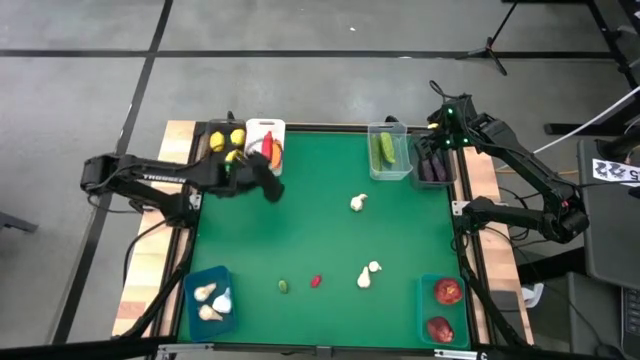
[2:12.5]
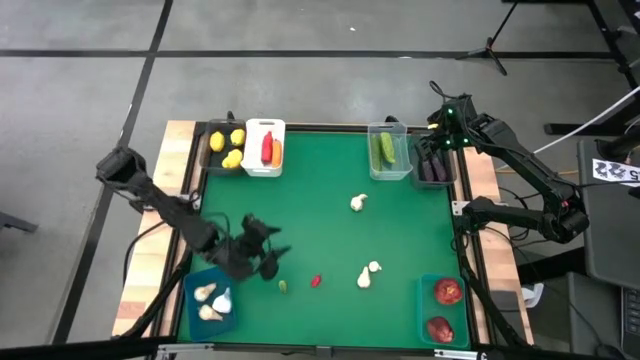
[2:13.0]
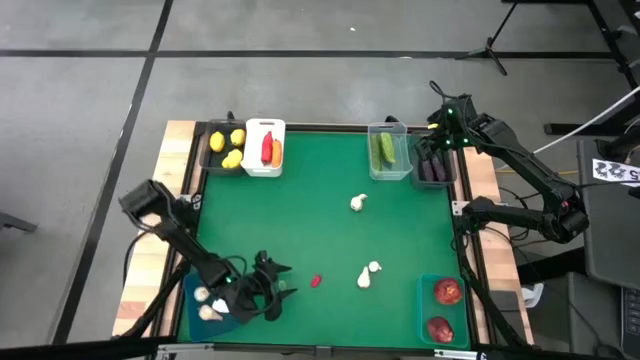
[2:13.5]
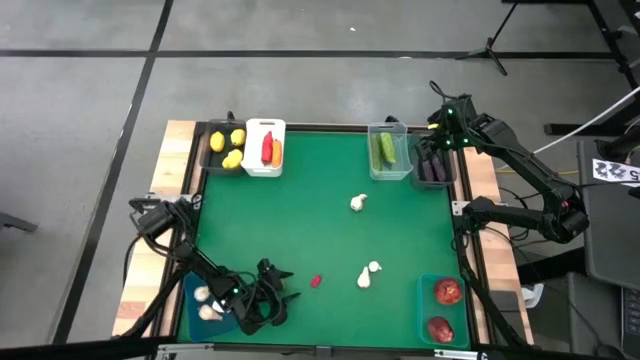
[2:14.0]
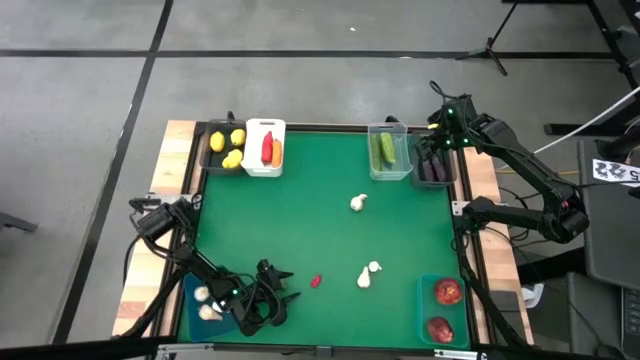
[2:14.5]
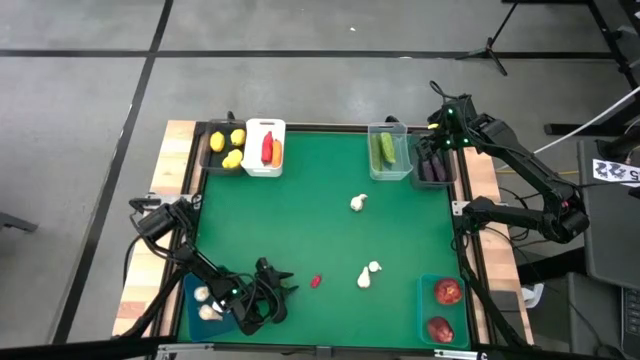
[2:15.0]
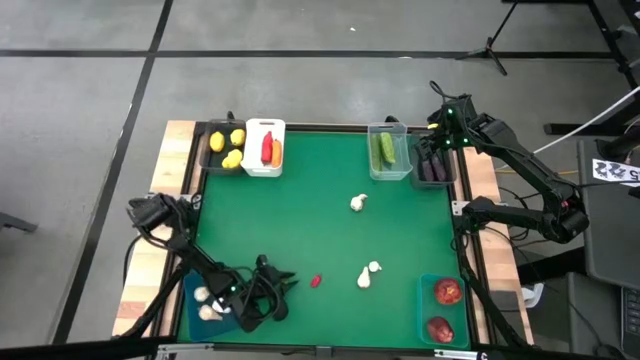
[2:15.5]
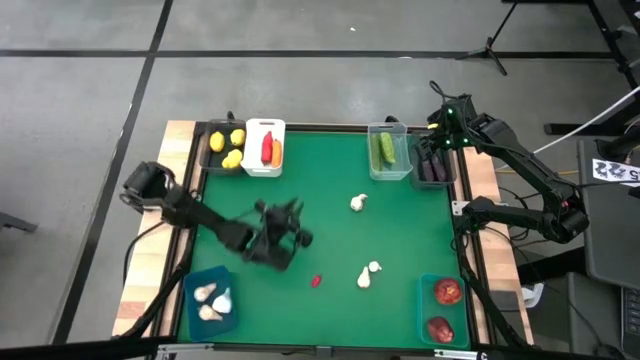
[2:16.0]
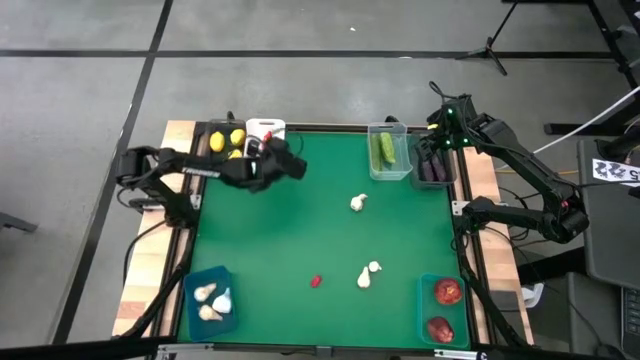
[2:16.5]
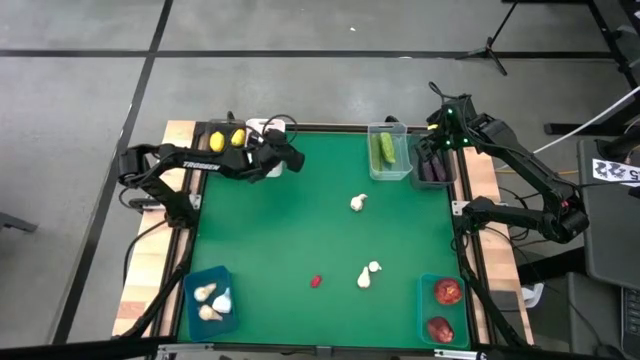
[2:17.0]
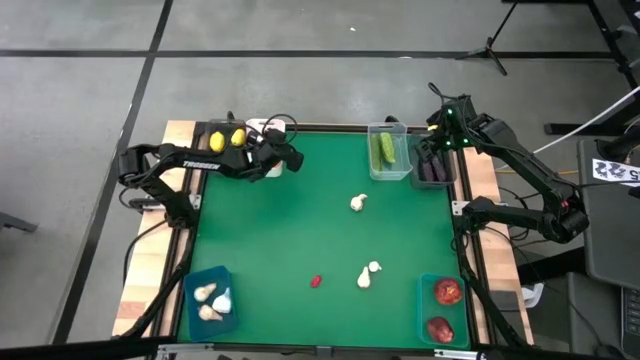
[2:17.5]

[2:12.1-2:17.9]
Task: Sort produce into baskets
Put the green chili pepper into the white bin

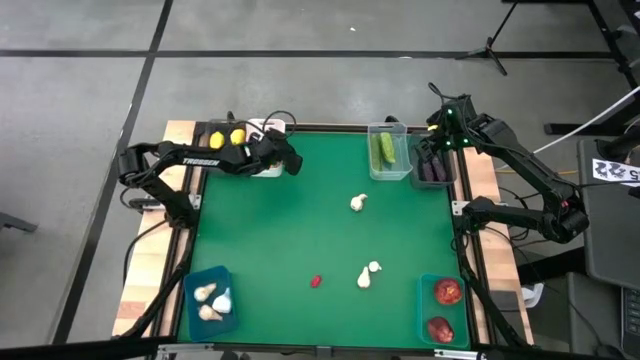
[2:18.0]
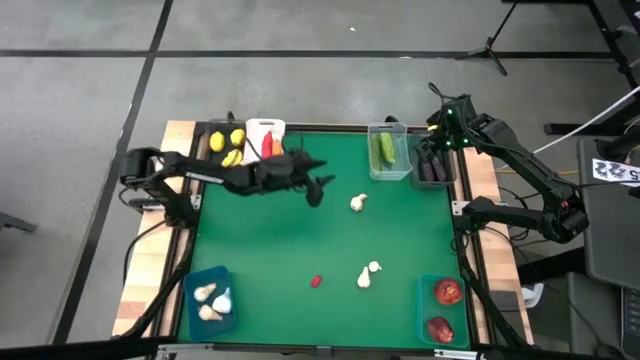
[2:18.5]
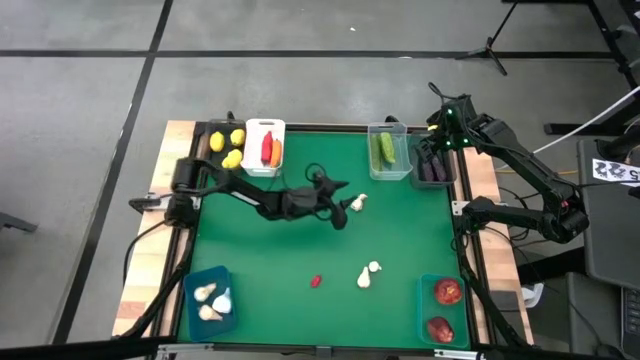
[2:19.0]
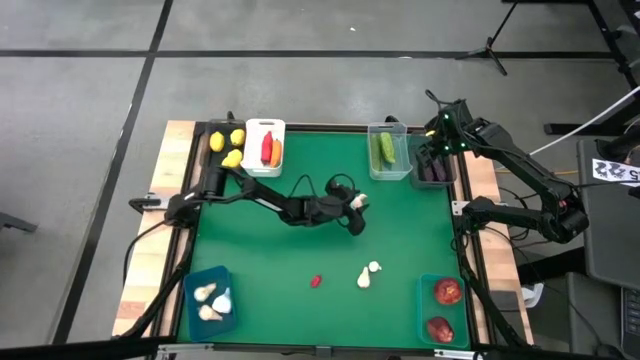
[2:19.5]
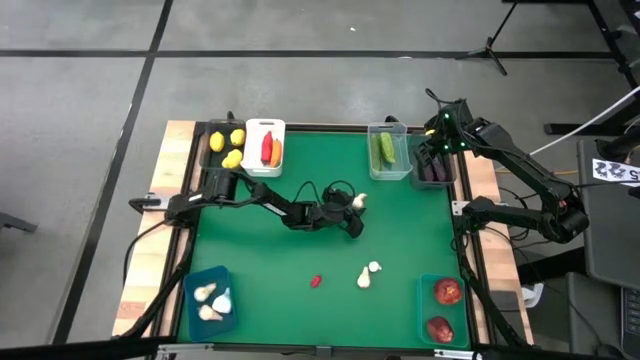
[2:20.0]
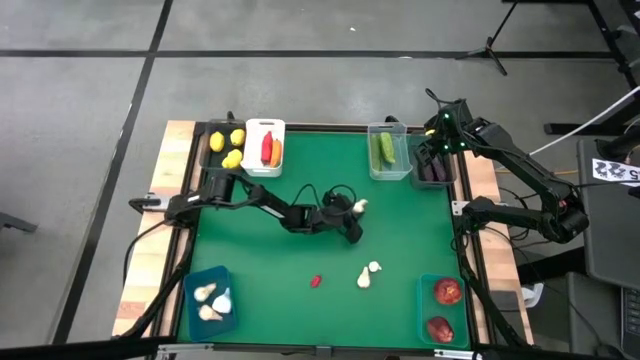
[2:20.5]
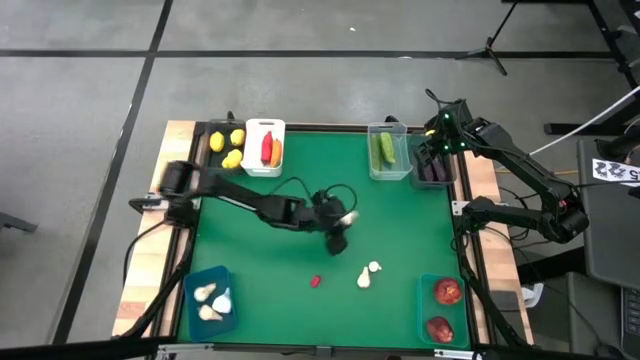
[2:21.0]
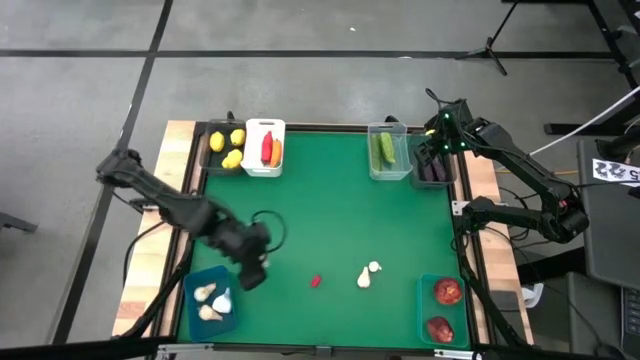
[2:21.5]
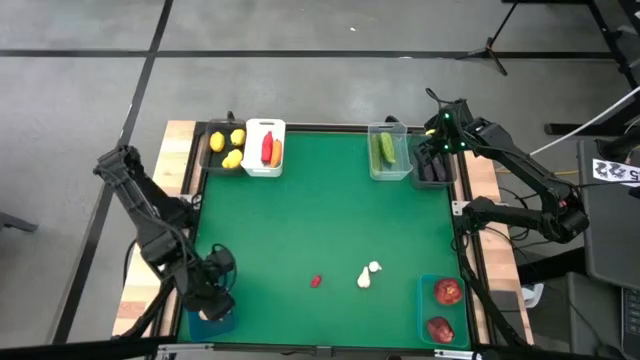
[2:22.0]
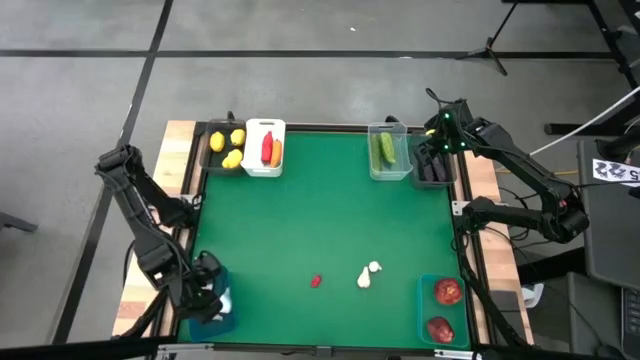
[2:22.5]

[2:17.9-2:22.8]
Put the garlic into the blue bin

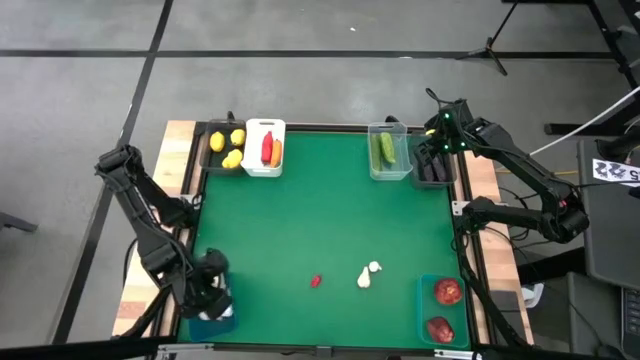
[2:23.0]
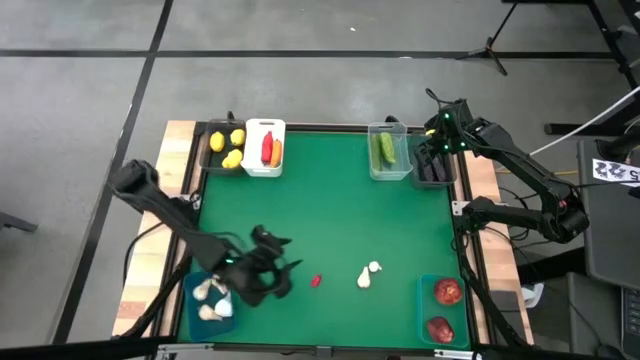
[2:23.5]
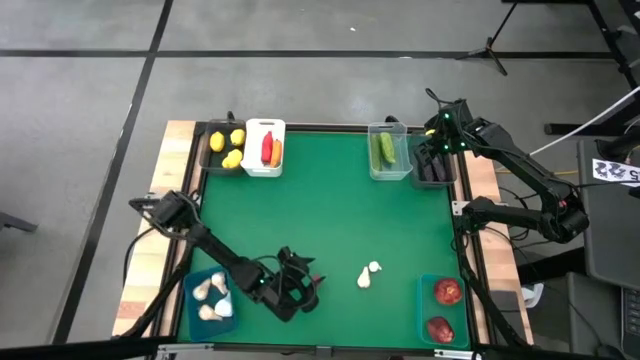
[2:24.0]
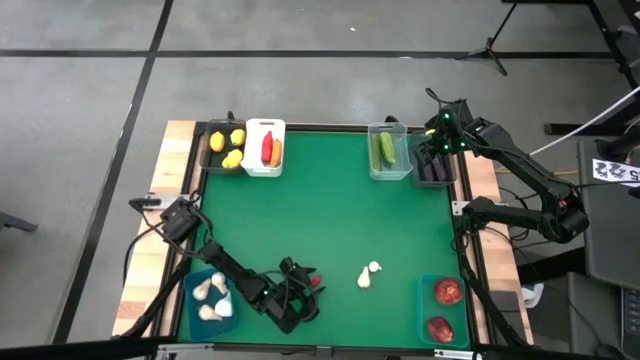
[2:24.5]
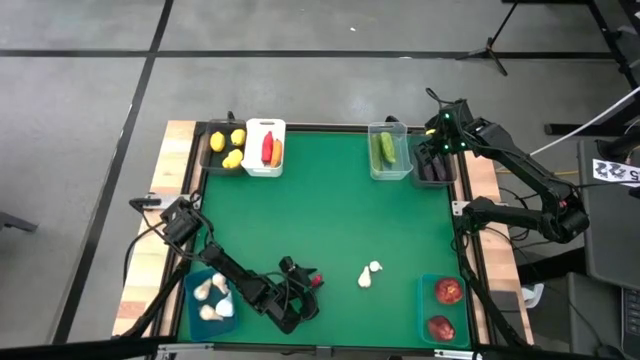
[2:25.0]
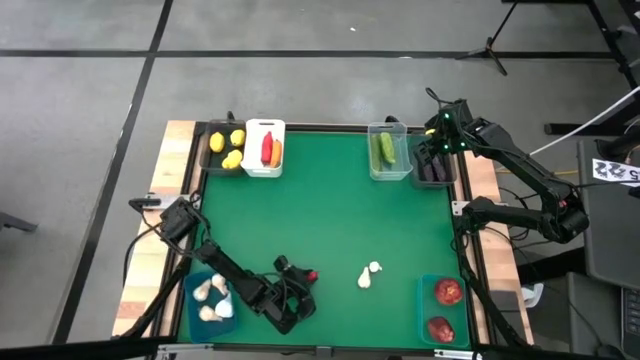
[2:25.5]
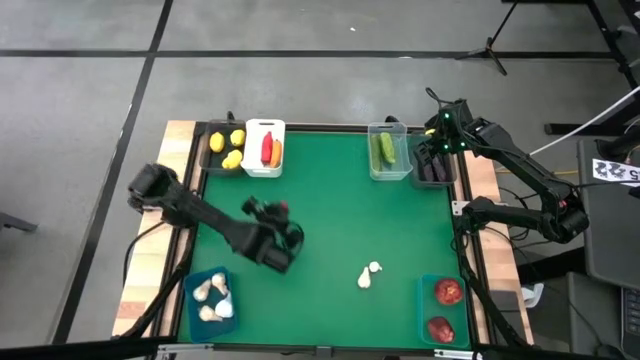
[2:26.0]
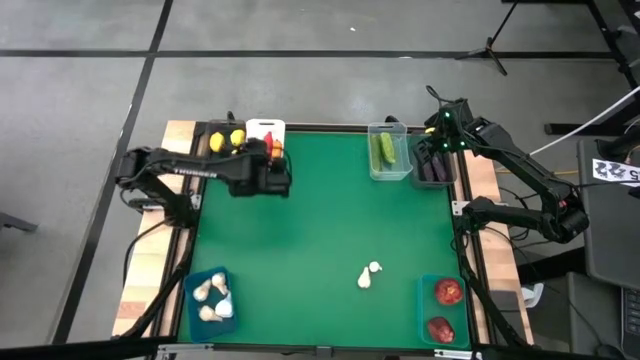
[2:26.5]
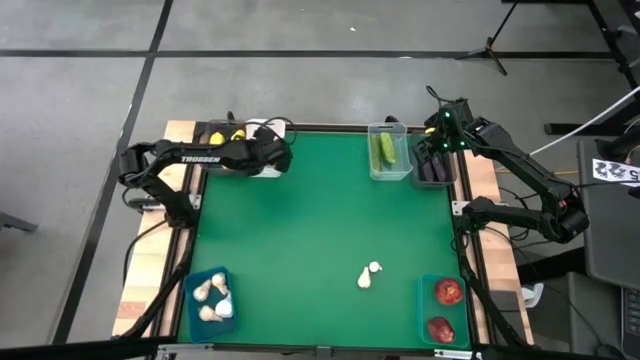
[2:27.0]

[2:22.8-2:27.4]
Put the red chili pepper into the white bin

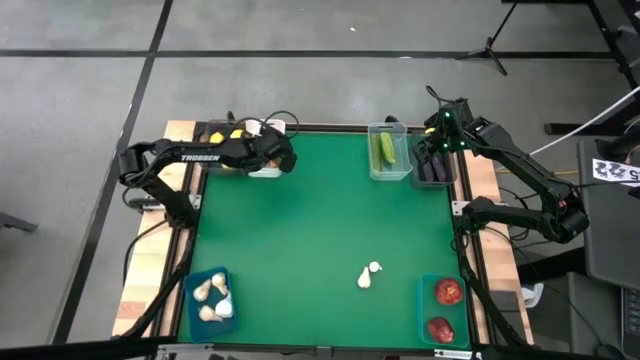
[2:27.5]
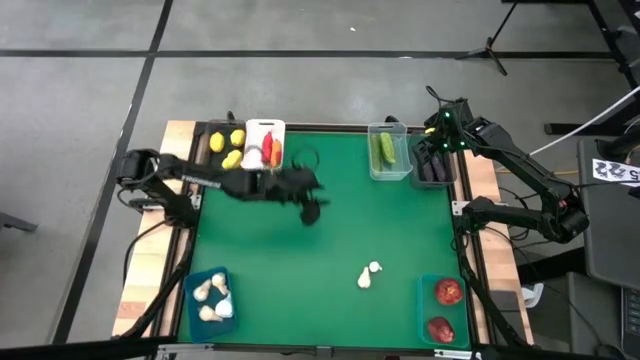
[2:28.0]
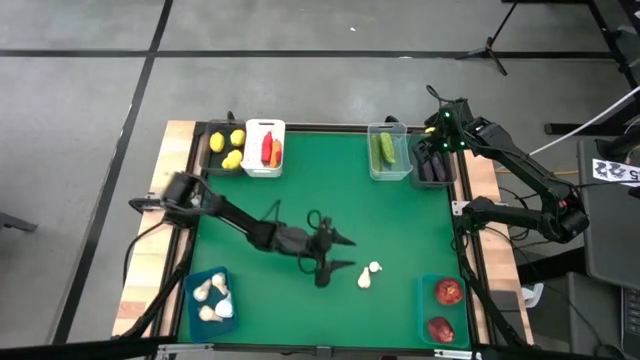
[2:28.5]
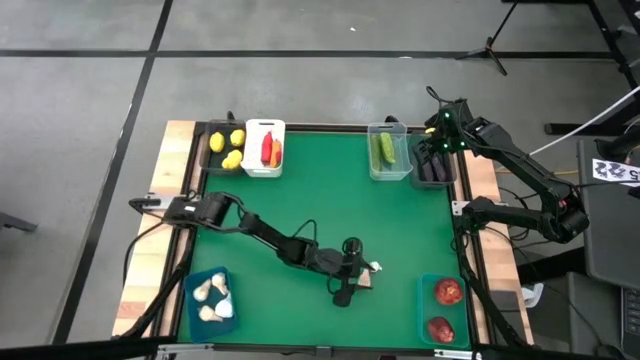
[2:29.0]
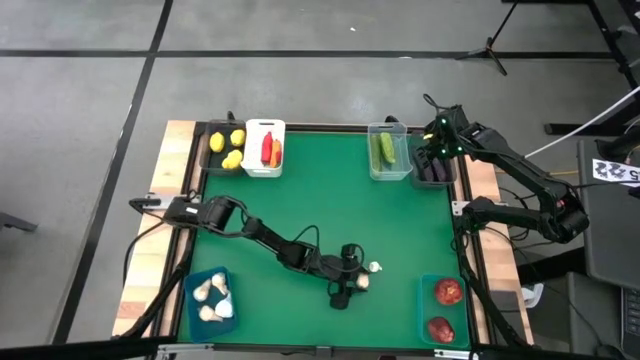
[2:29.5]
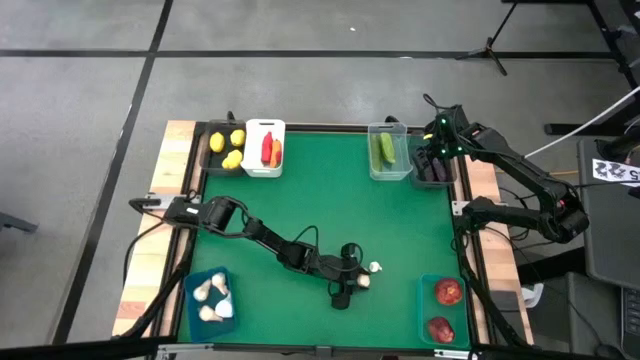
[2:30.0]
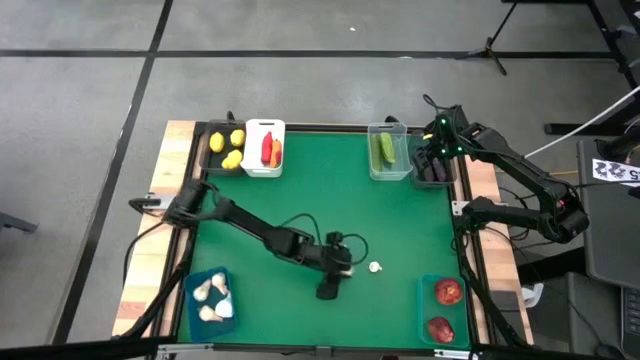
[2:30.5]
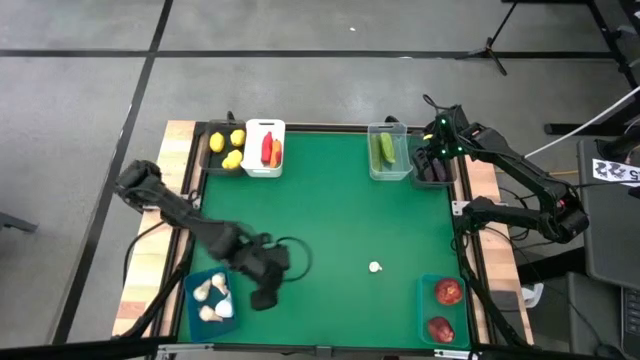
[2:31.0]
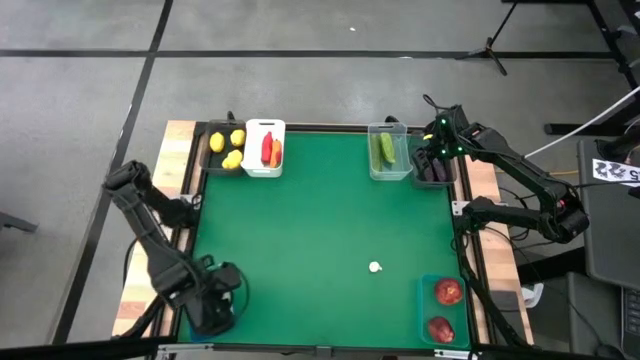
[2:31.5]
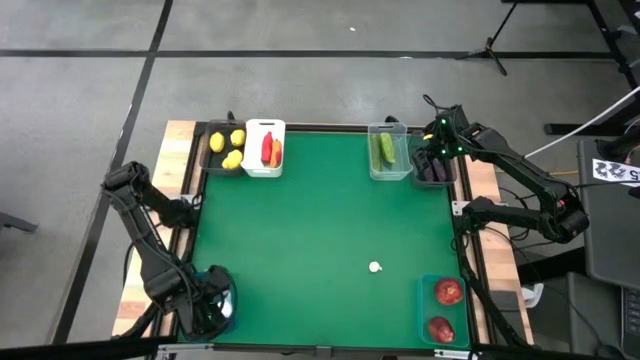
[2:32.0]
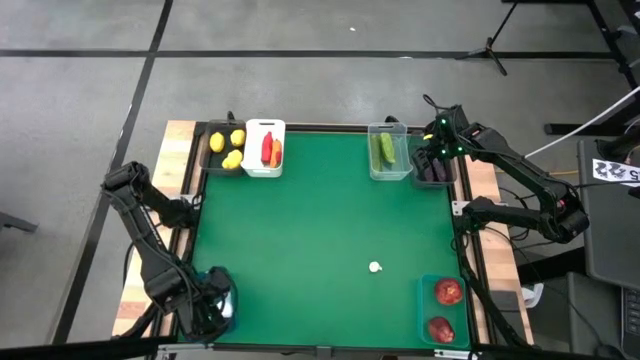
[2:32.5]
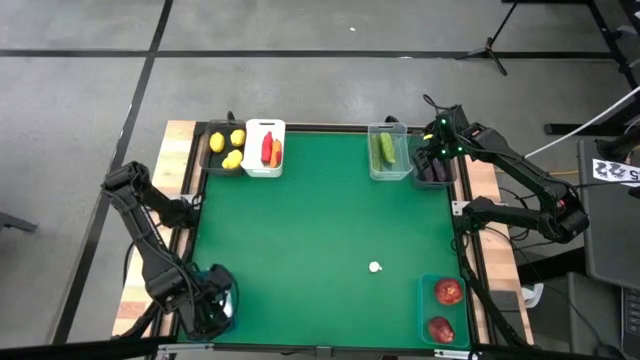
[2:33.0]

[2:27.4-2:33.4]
Put the garlic into the blue bin
